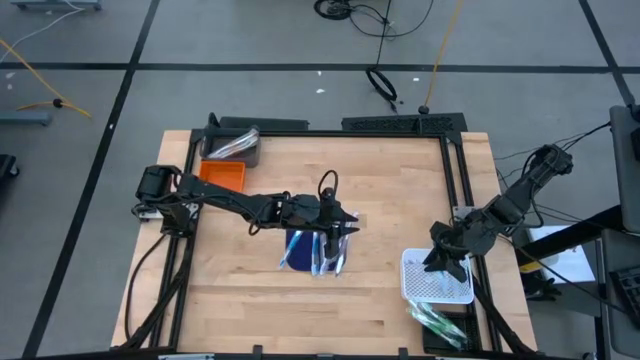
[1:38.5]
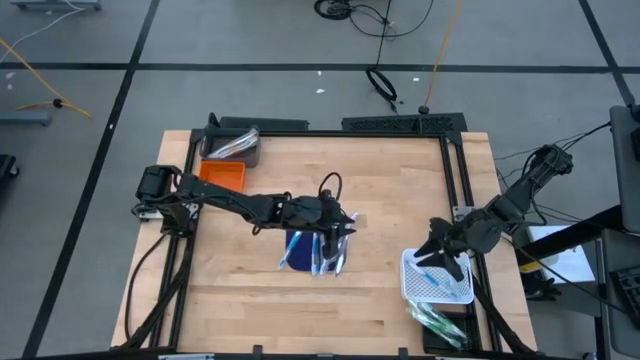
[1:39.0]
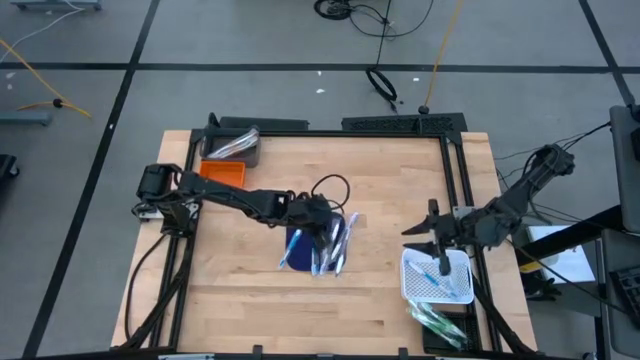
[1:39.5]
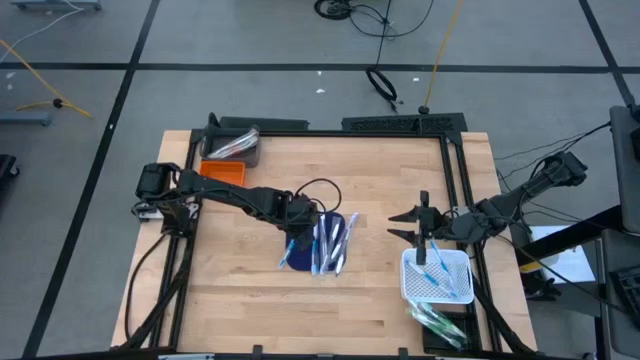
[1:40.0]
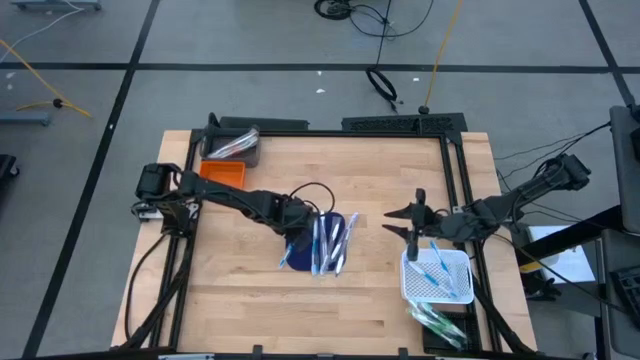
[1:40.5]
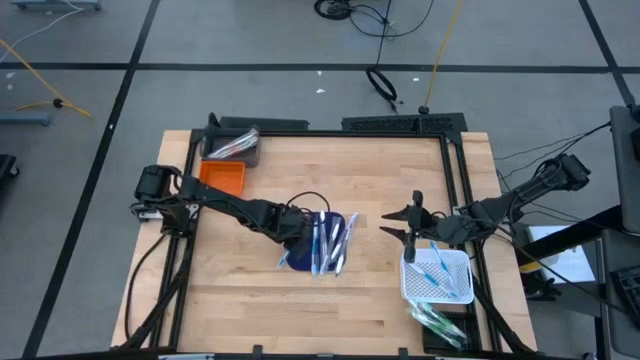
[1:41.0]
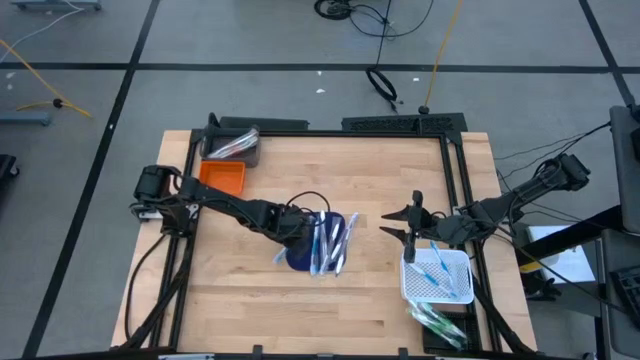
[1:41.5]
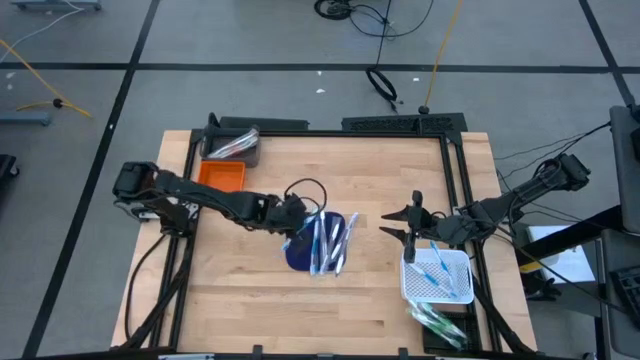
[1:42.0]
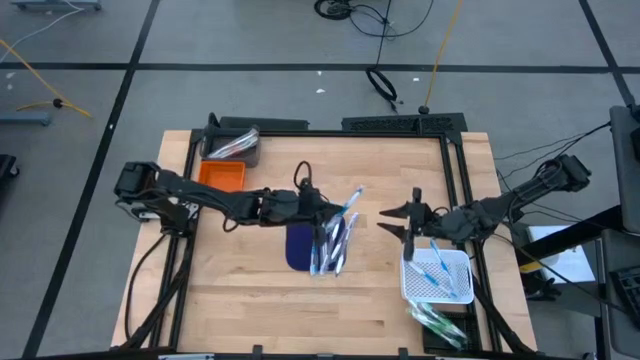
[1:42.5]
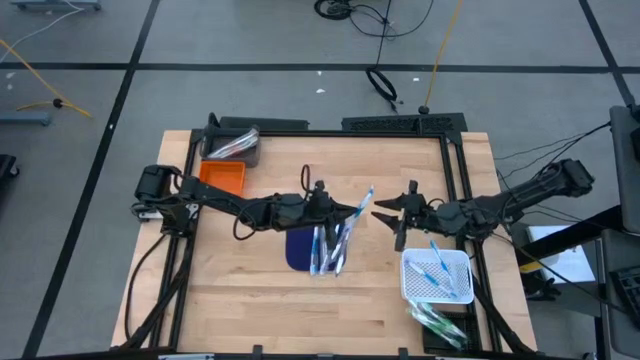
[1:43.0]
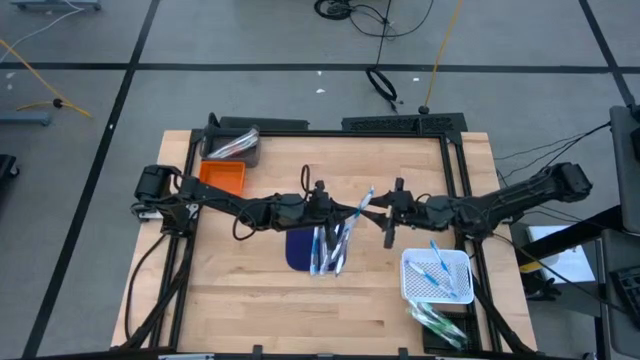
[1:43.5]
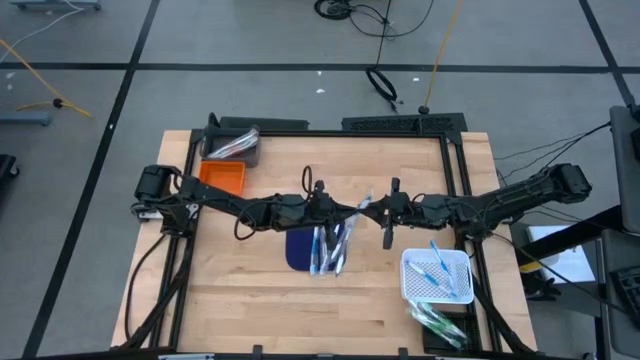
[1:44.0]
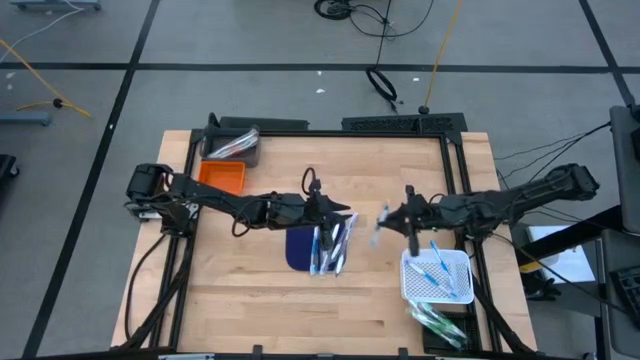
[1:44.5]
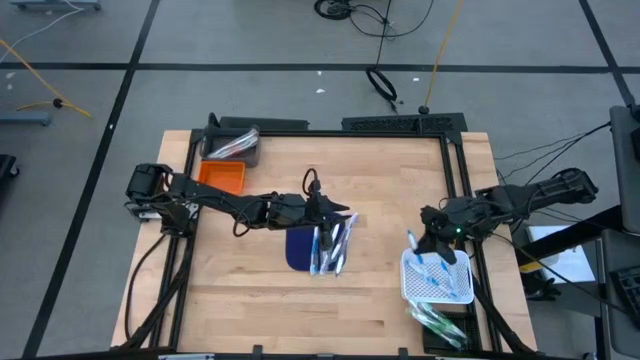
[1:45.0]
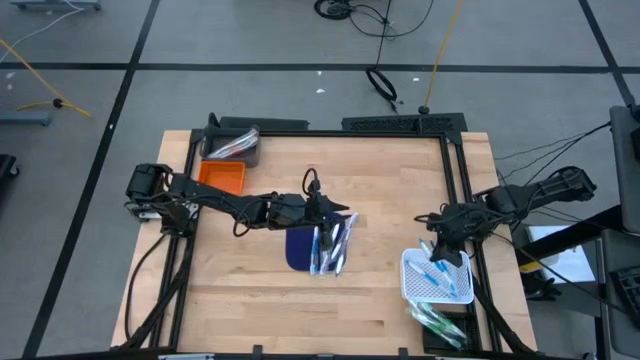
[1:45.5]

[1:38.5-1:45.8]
Task: Pick & Place Toothbrushes
Put the blue toothbrush into the white bin

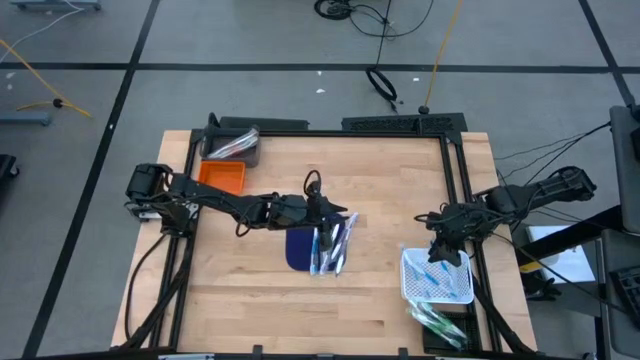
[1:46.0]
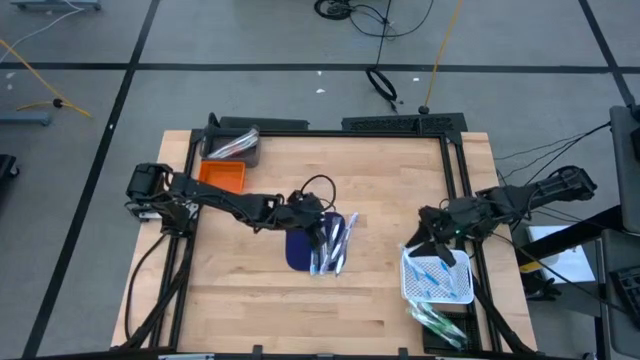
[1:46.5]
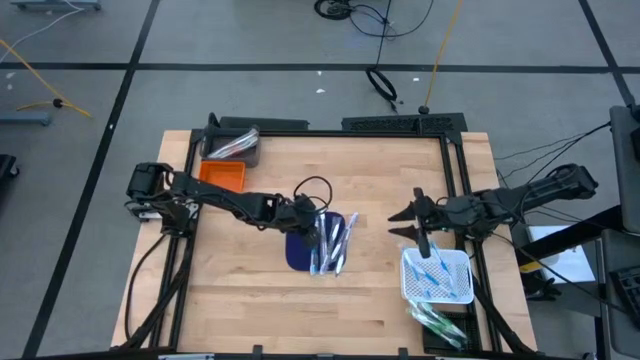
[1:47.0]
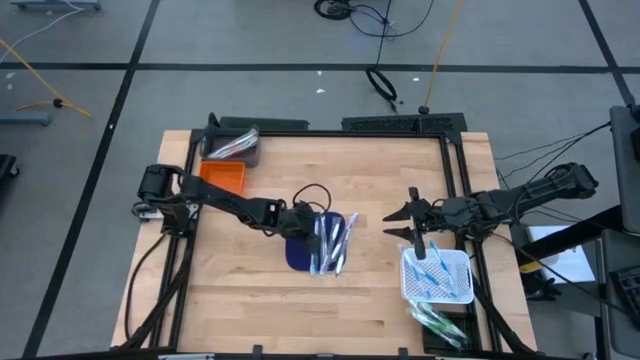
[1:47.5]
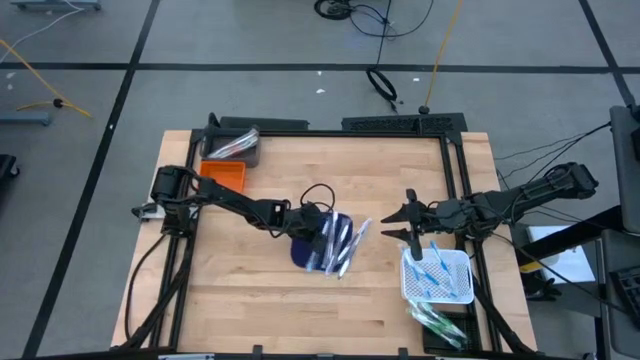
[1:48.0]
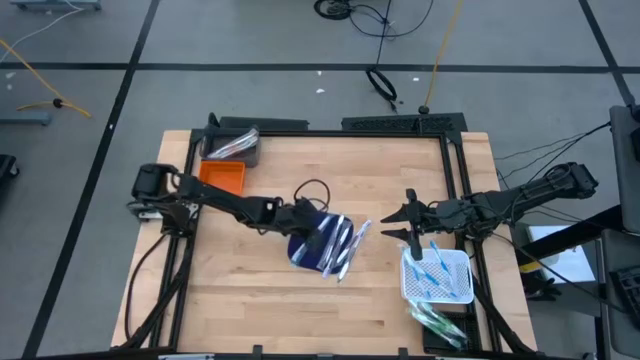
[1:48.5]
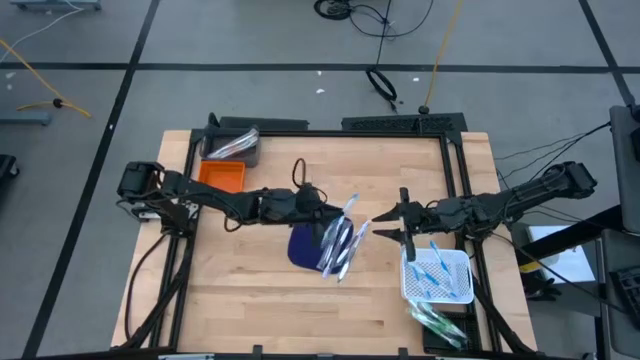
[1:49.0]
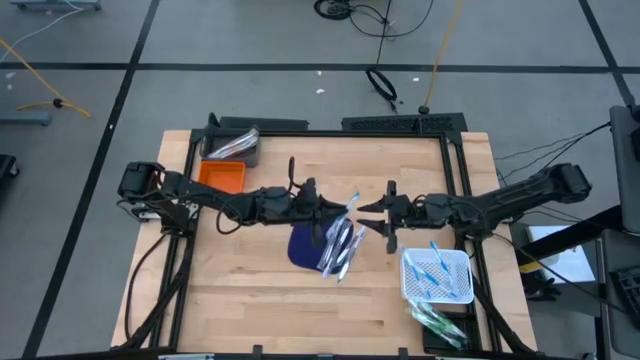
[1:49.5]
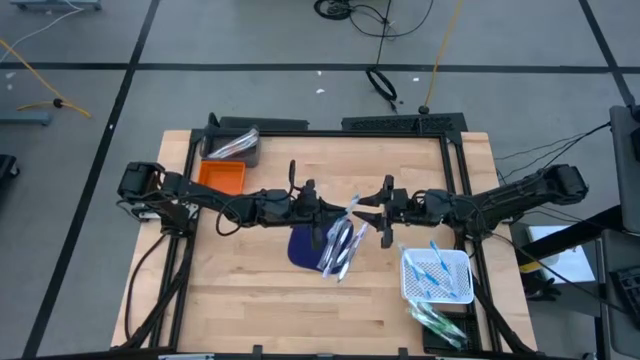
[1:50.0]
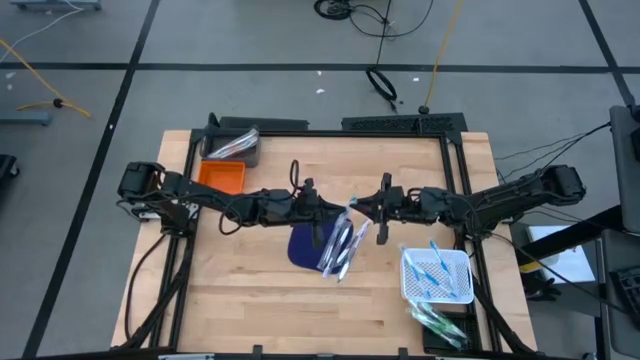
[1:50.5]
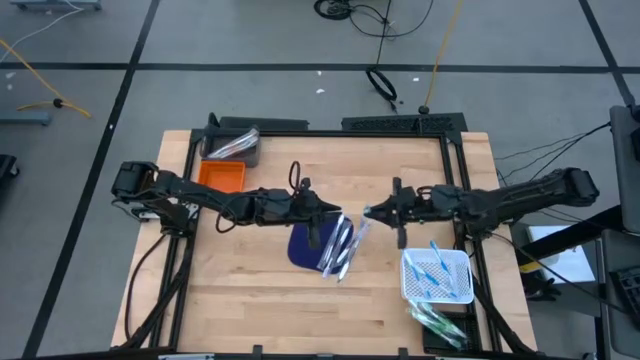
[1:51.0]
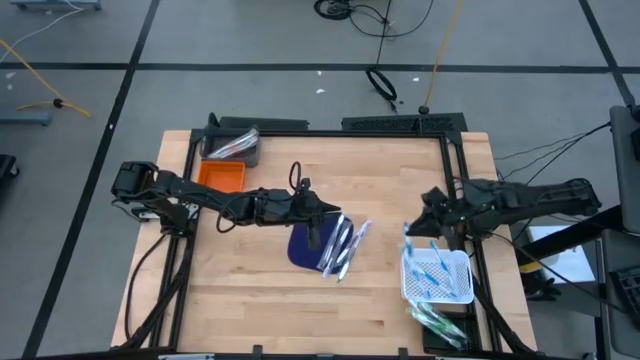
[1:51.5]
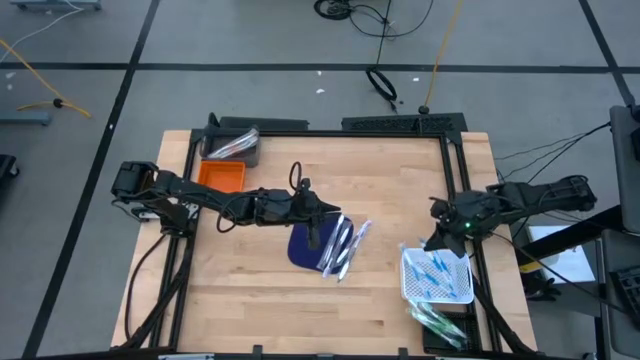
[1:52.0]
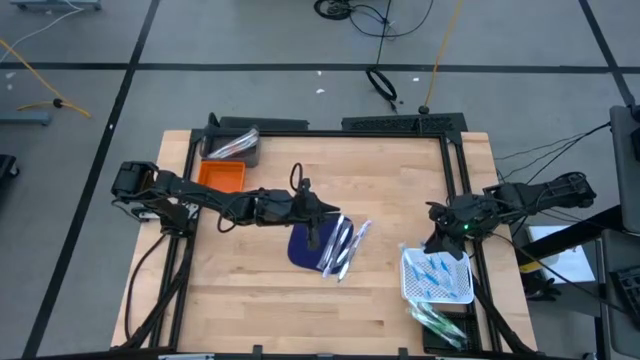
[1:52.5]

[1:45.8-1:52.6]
Put the blue toothbrush into the white bin

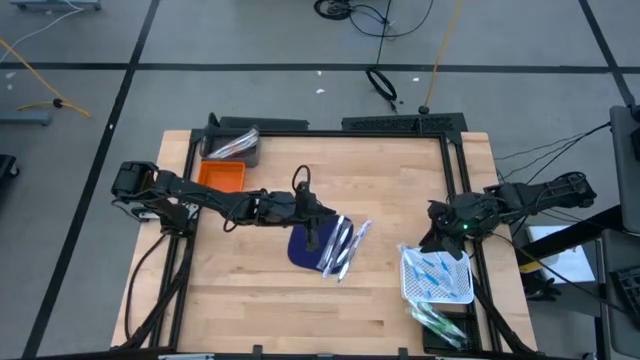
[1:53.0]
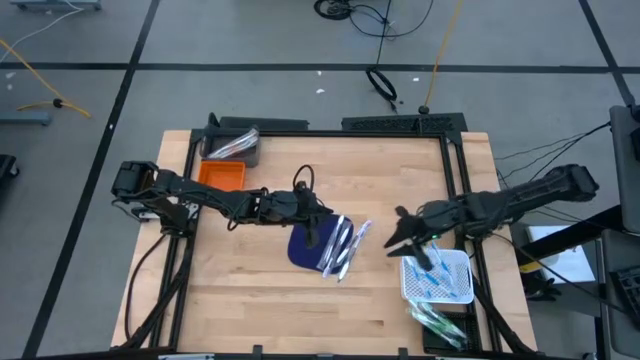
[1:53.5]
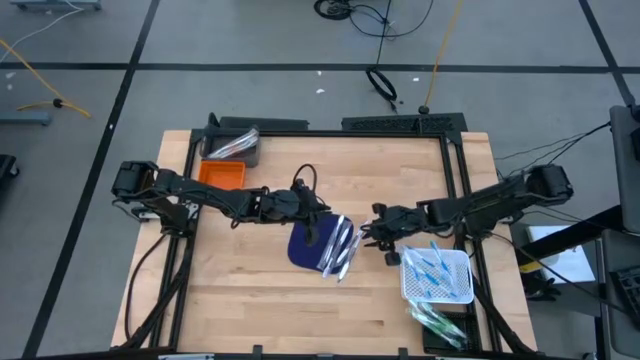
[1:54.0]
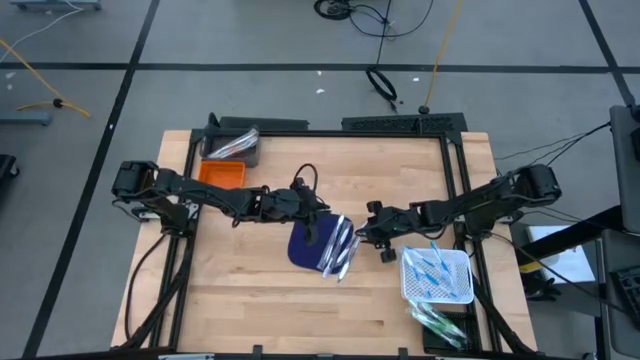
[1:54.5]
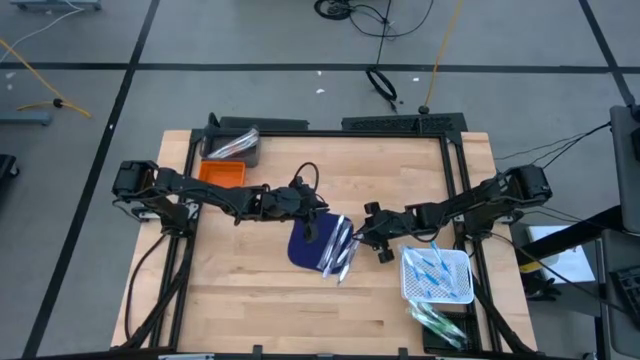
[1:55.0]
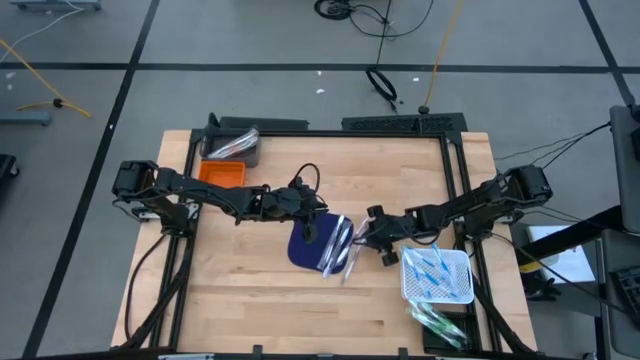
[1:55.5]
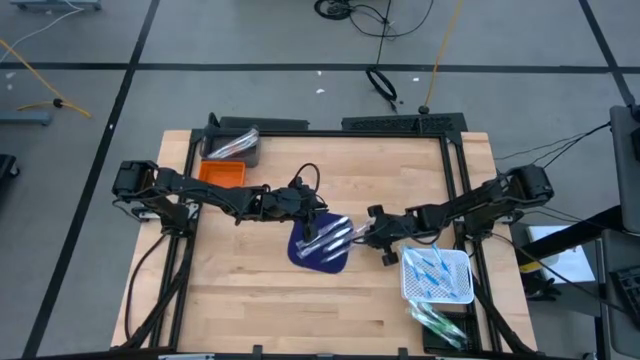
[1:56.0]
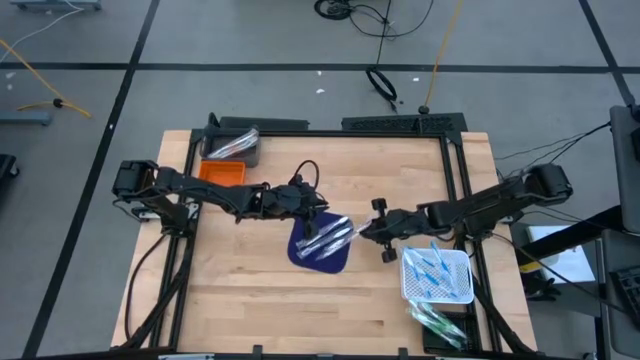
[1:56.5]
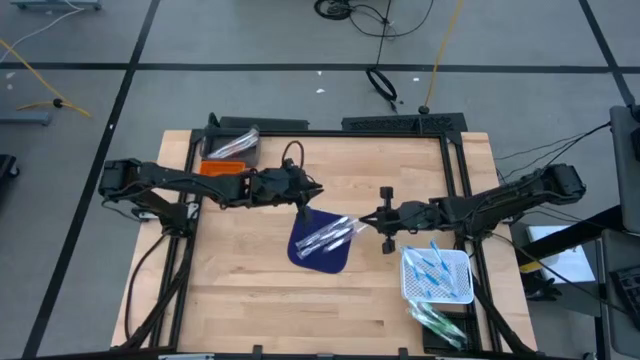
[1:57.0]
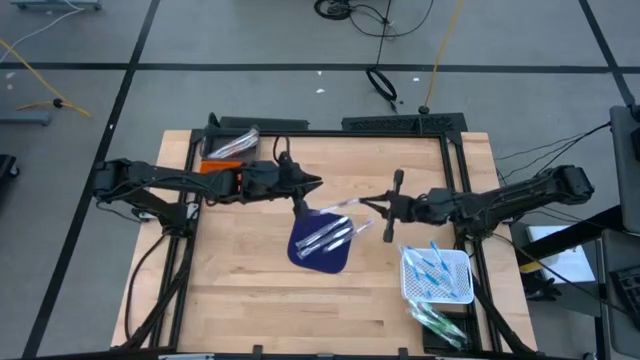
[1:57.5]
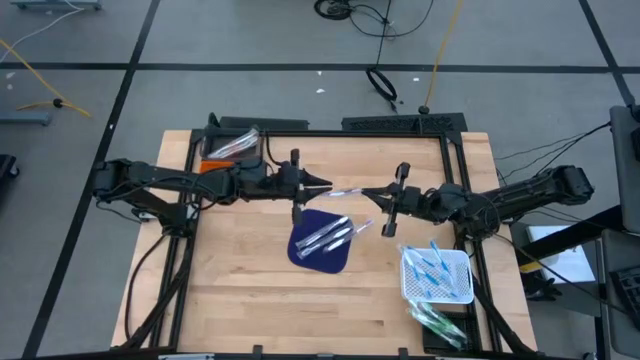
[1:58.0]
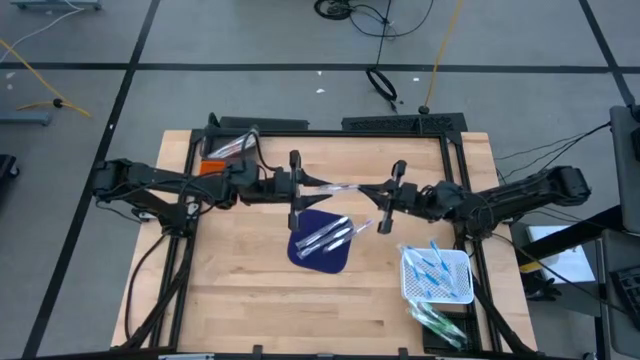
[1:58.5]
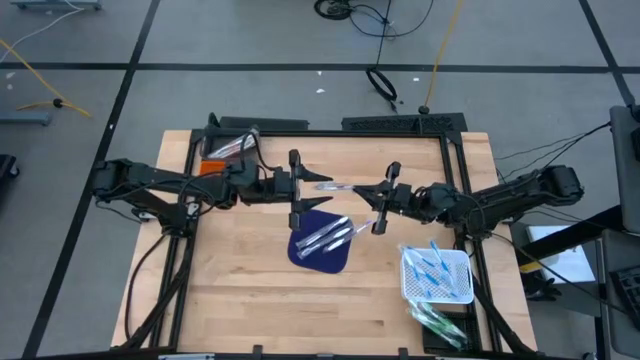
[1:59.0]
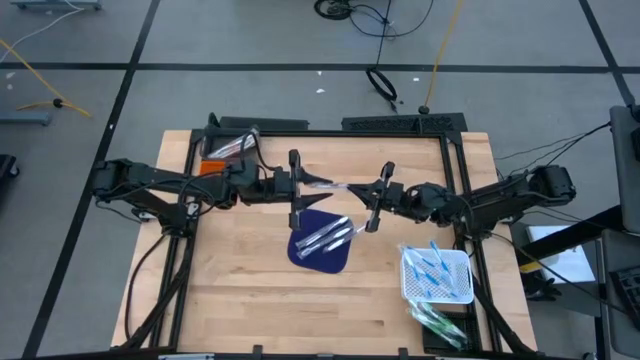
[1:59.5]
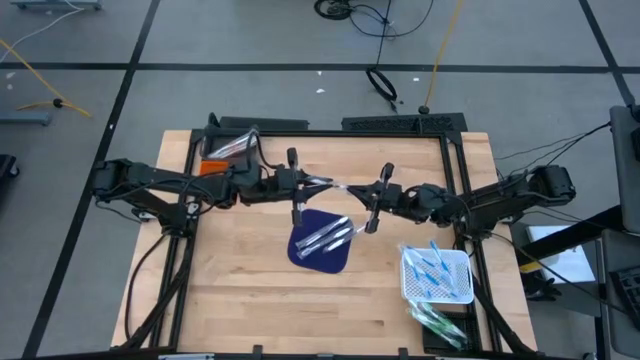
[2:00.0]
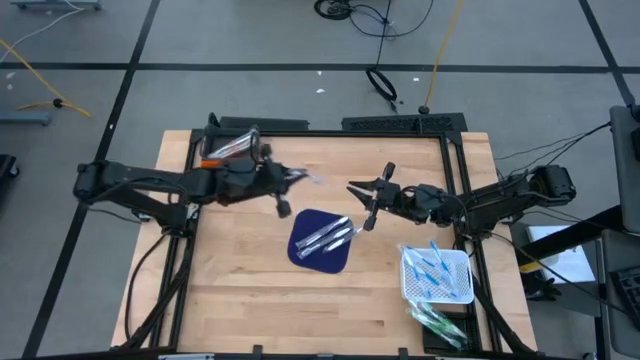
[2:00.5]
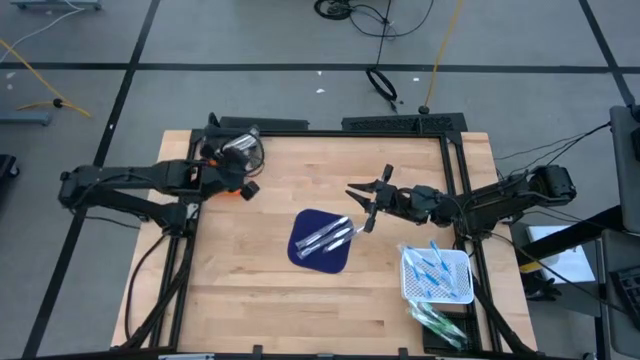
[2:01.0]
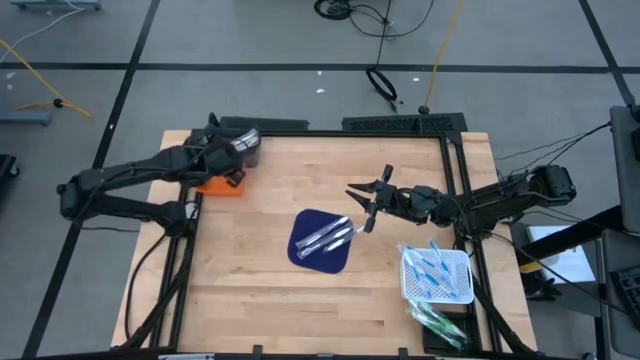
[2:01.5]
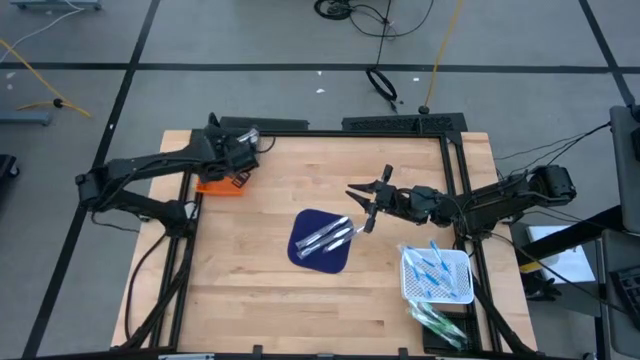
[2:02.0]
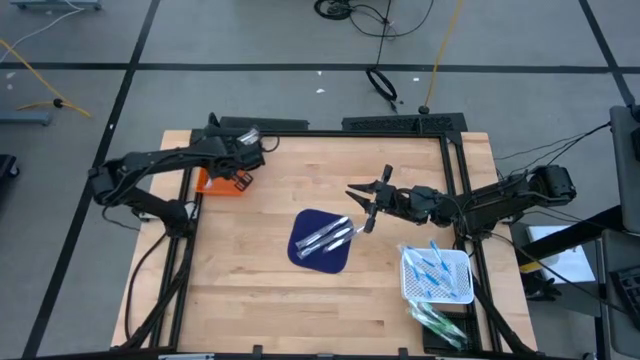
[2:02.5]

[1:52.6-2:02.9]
Put the purple toothbrush into the orange bin
